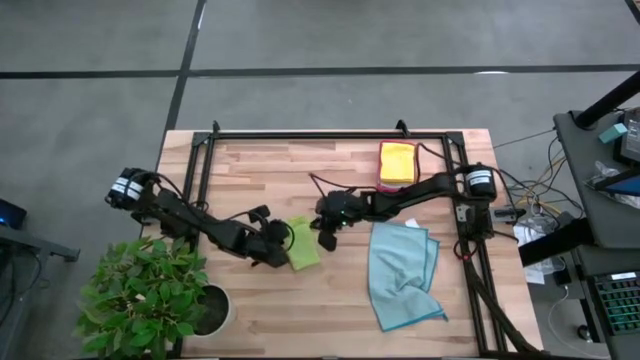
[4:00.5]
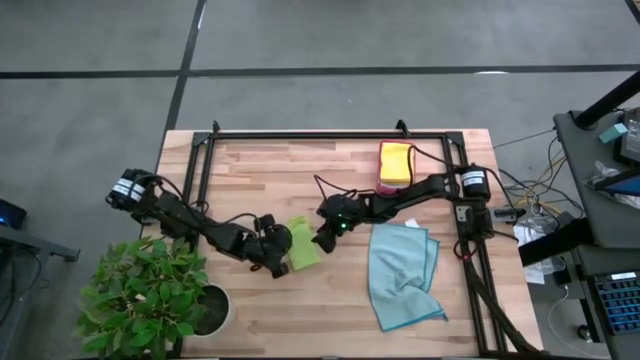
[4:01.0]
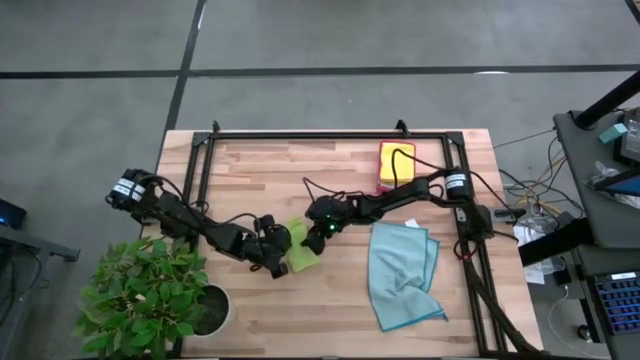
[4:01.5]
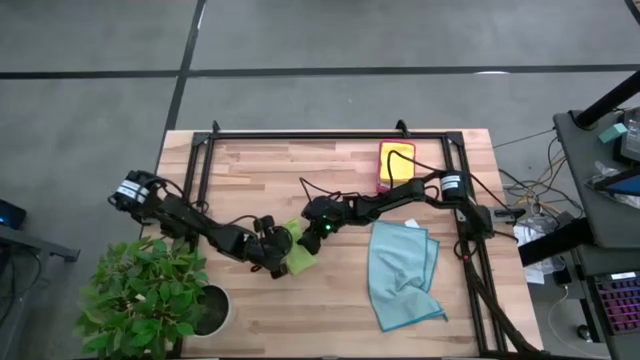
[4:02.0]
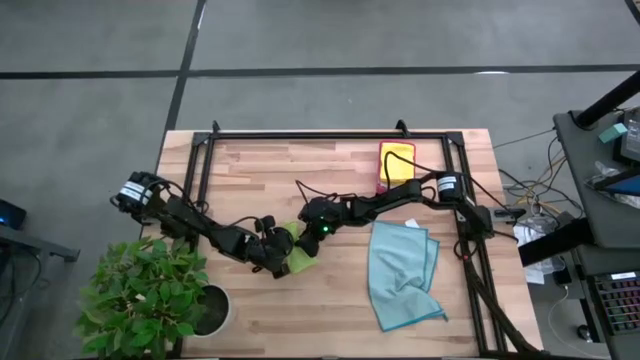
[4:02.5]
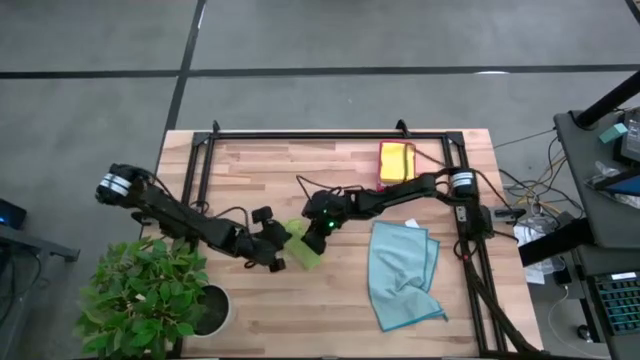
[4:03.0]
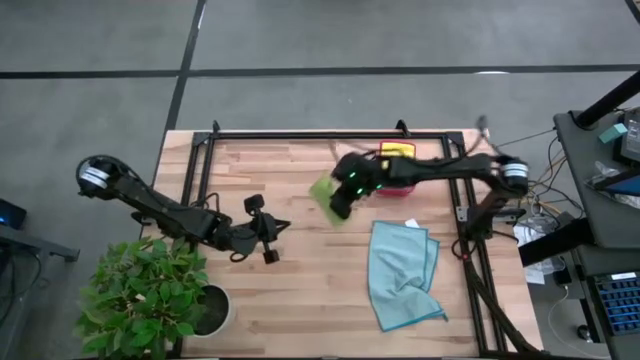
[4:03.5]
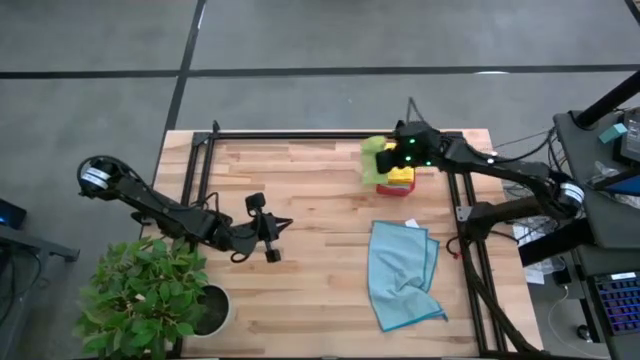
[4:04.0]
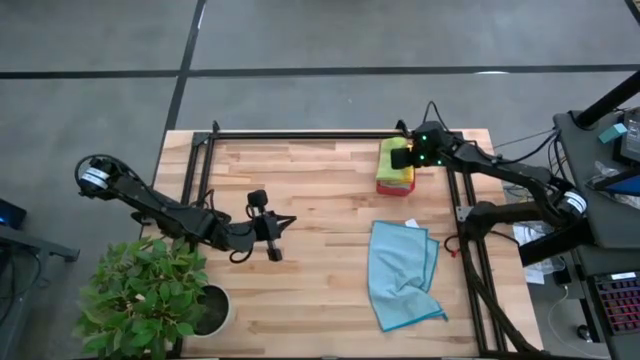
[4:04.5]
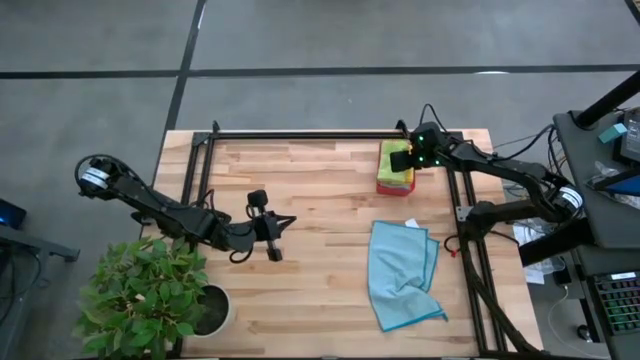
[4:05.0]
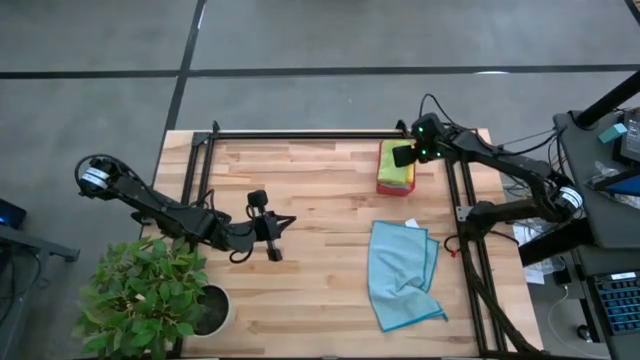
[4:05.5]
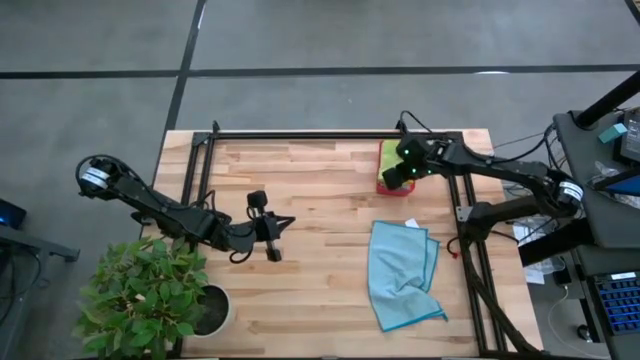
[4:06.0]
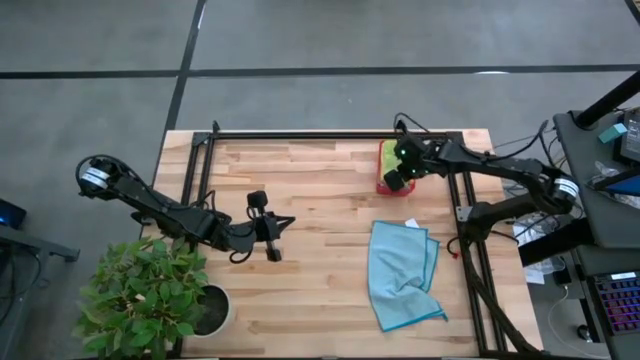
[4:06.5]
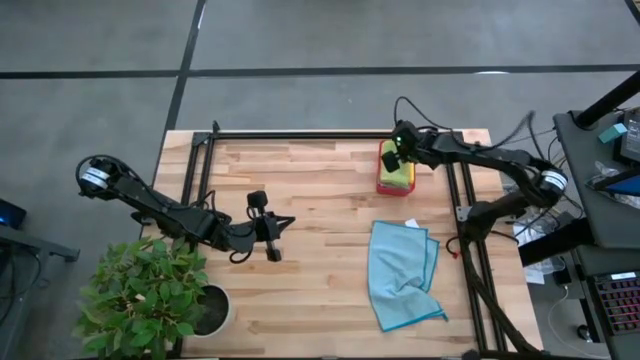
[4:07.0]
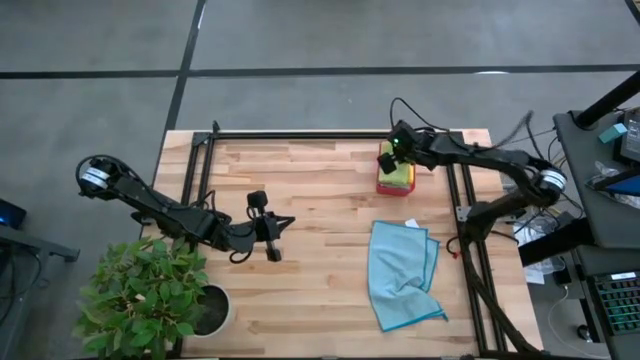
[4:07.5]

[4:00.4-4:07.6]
Task: Fold microfiber towels
Put the folded green microfiber towel into the red bin

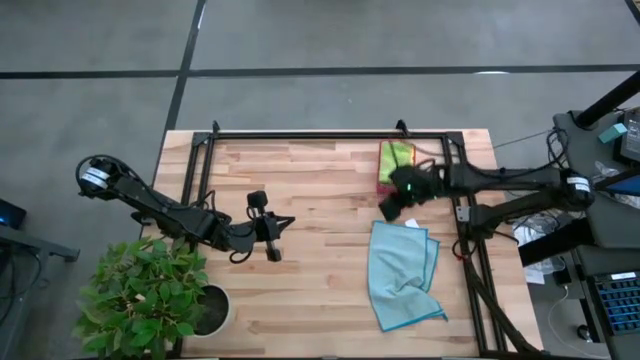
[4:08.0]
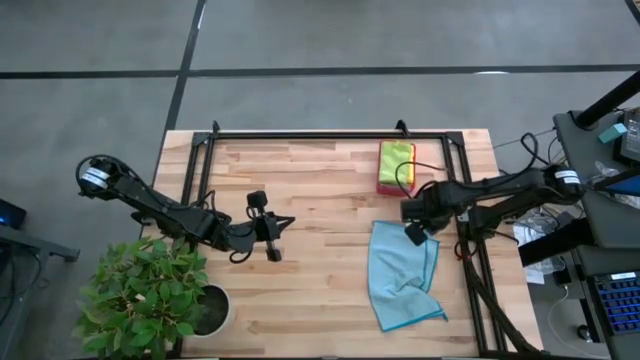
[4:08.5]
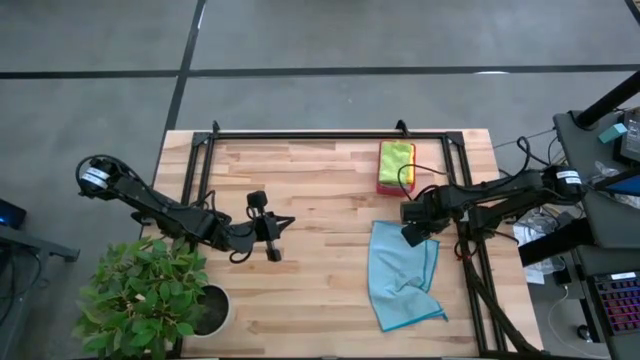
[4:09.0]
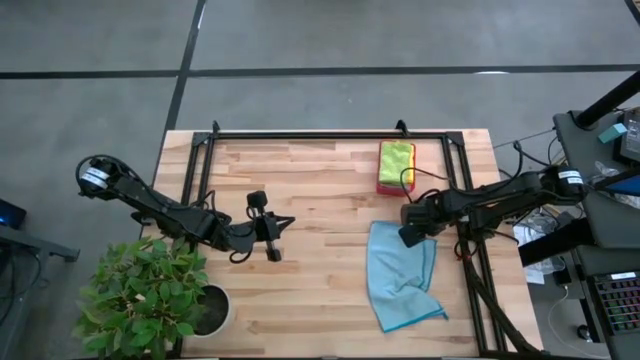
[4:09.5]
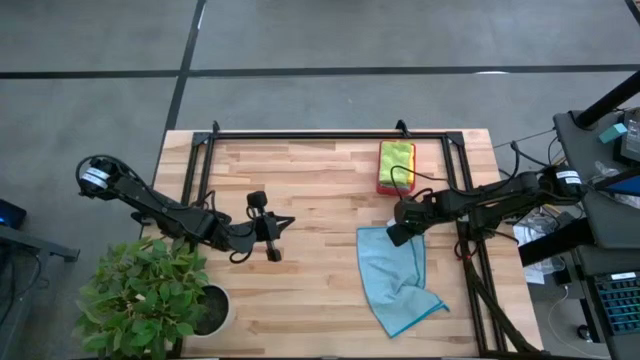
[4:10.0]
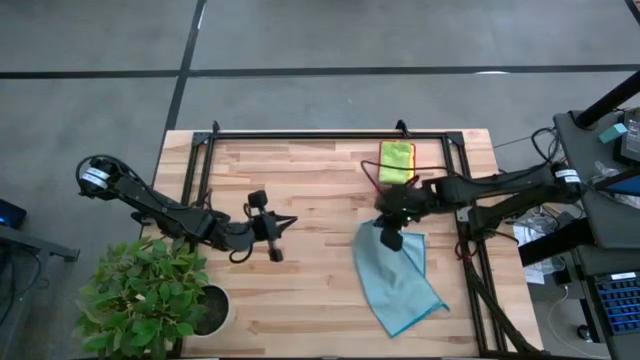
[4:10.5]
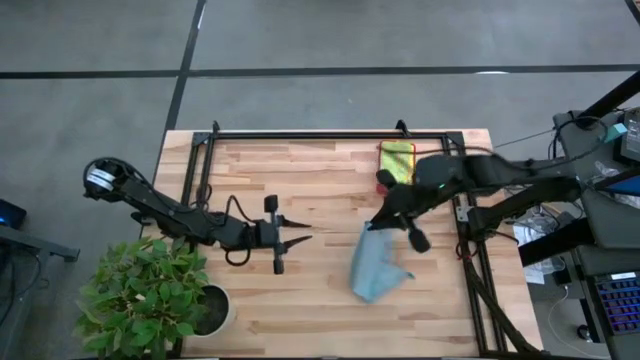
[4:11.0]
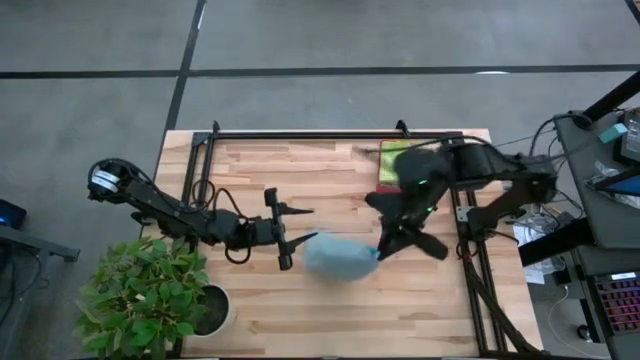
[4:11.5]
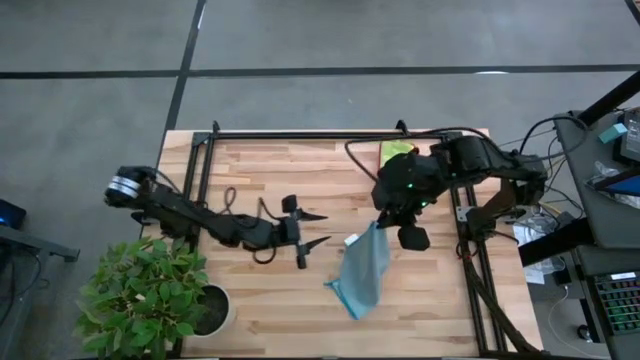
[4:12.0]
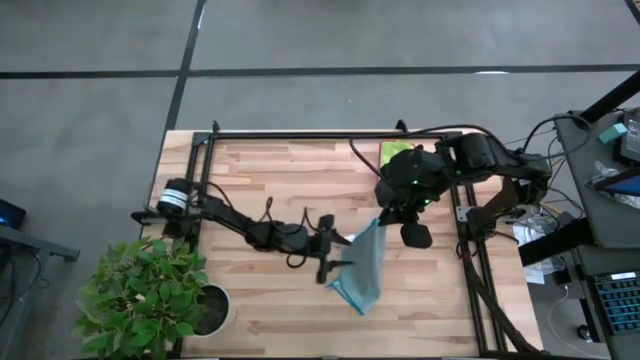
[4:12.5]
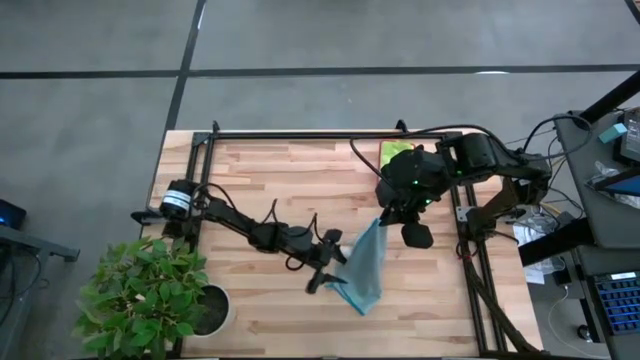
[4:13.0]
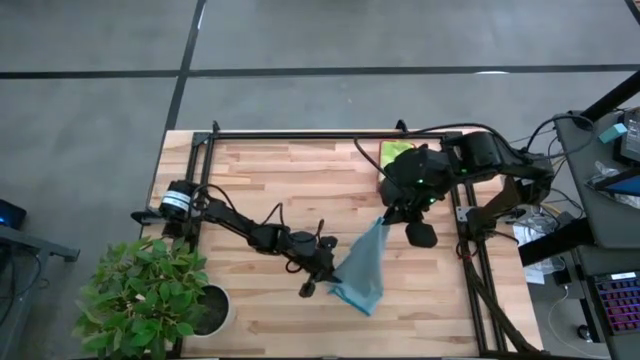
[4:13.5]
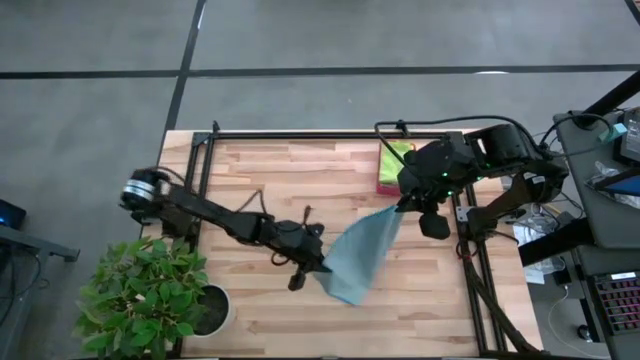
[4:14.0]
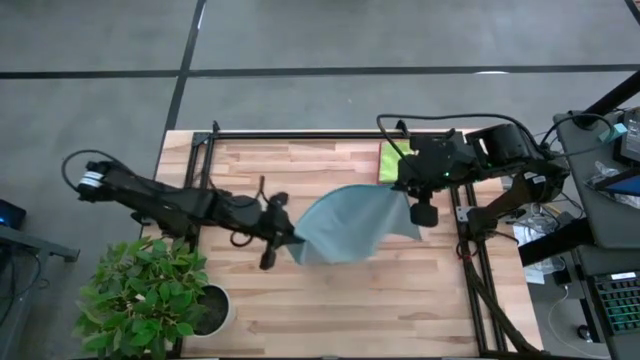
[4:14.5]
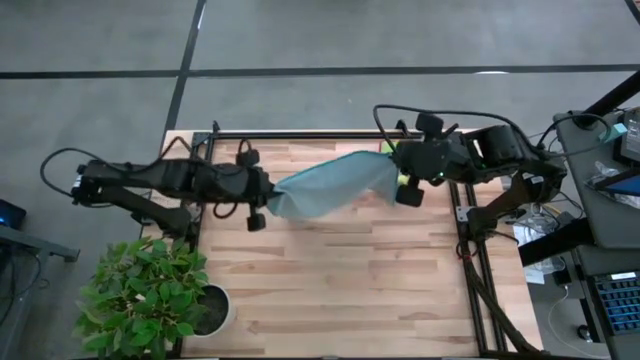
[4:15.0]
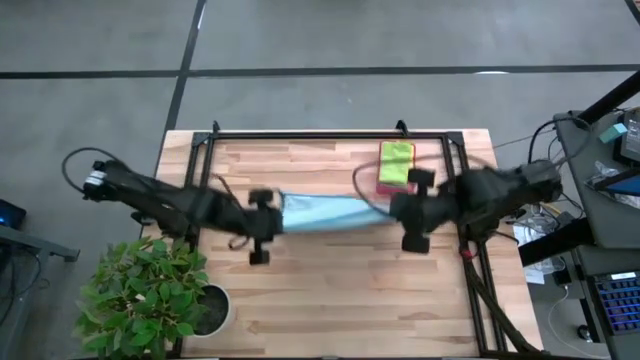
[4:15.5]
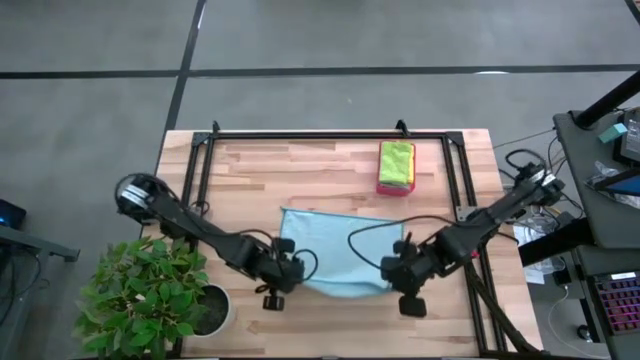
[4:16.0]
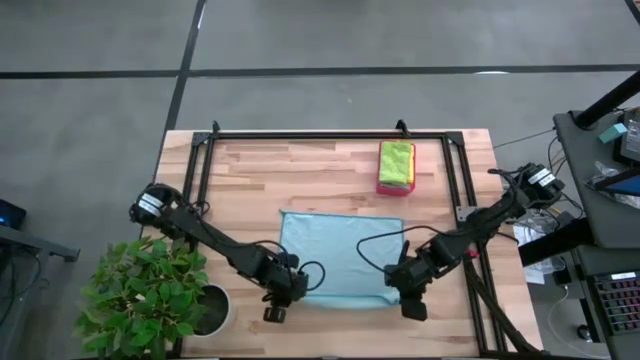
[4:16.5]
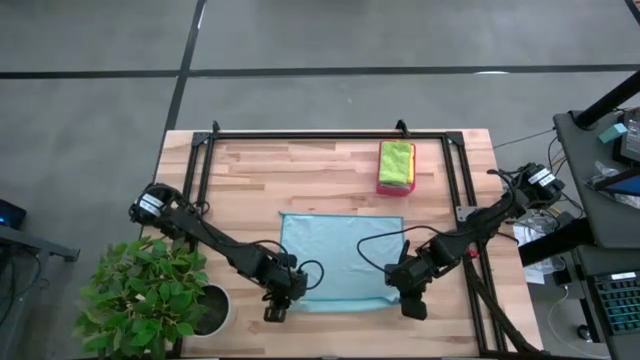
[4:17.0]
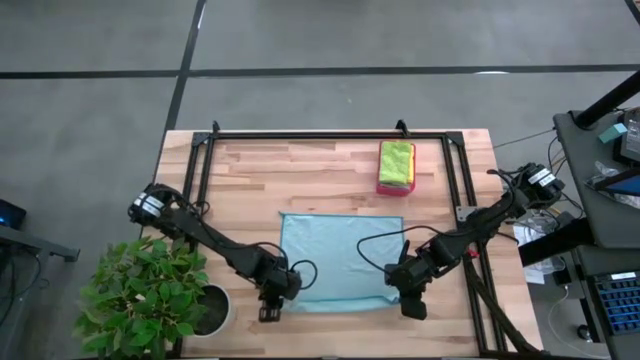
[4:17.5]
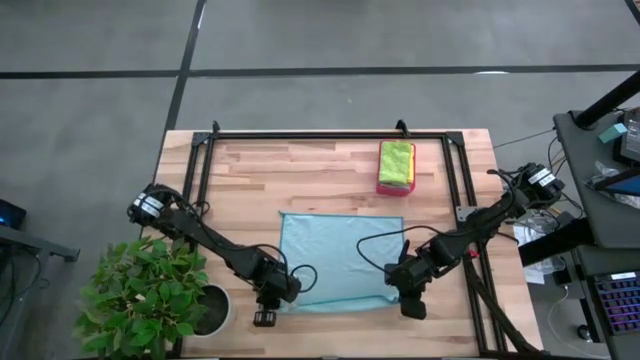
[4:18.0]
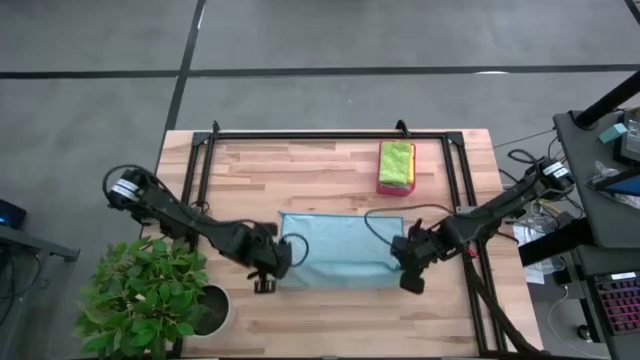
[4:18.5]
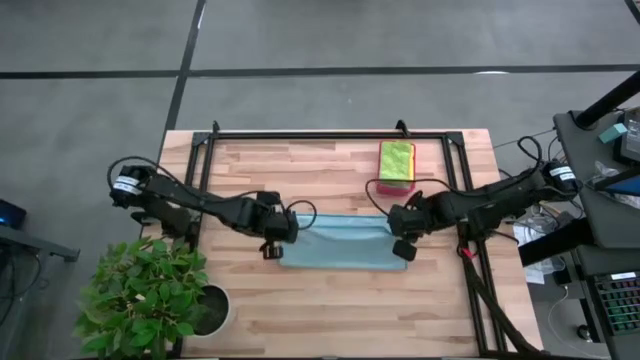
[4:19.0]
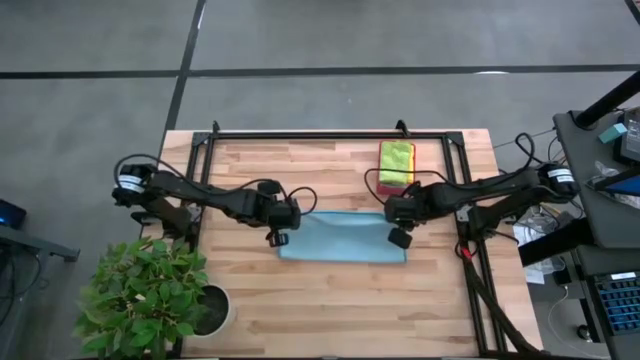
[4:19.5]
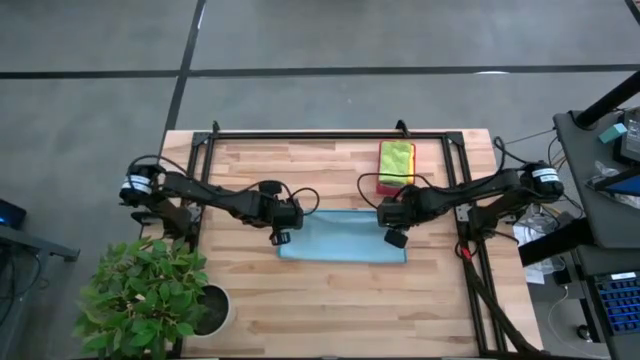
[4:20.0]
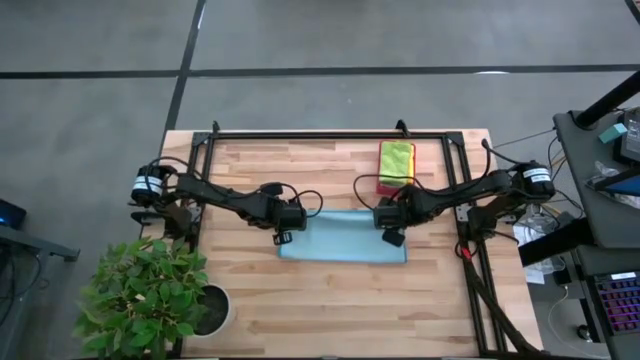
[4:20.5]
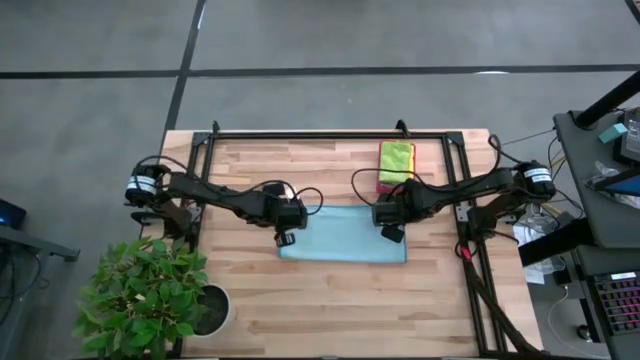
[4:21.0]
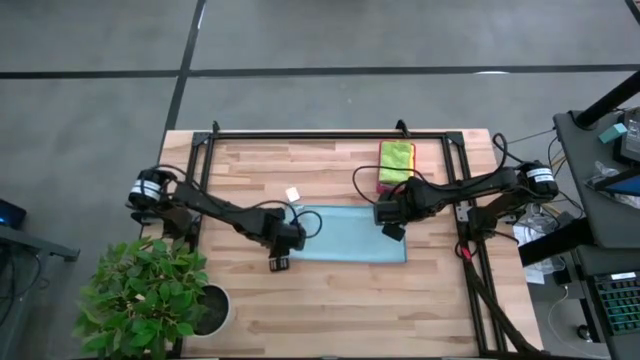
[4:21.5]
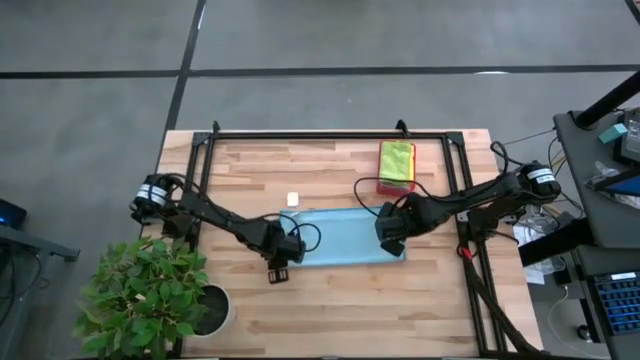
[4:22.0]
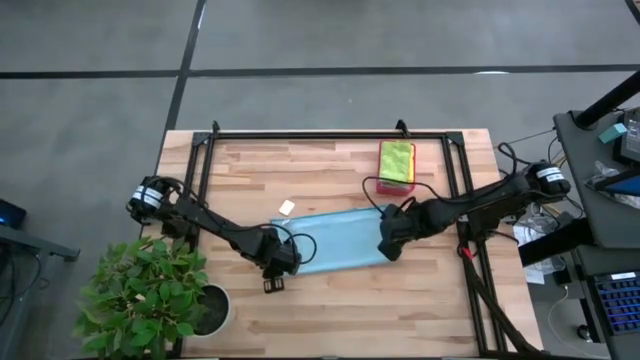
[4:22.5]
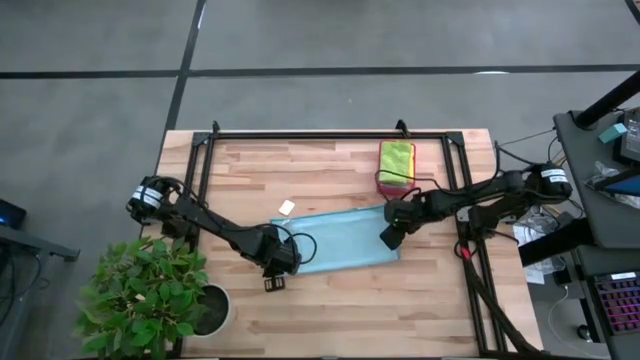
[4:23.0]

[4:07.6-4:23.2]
Fold the blue microfiber towel
